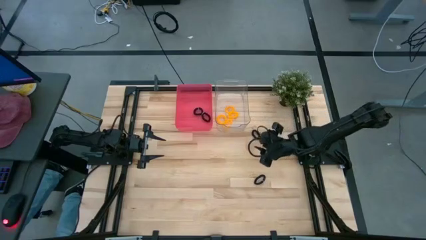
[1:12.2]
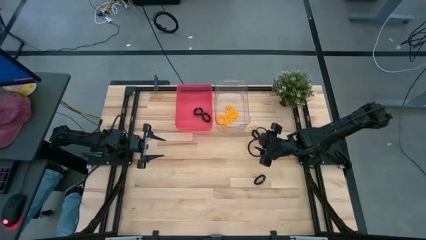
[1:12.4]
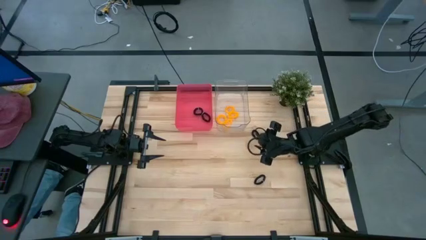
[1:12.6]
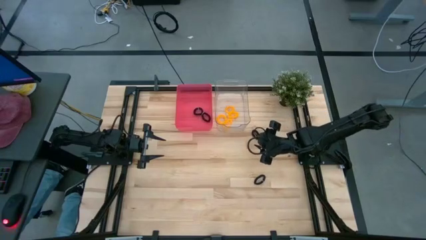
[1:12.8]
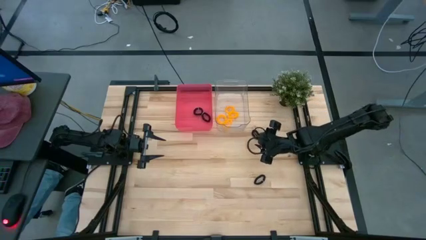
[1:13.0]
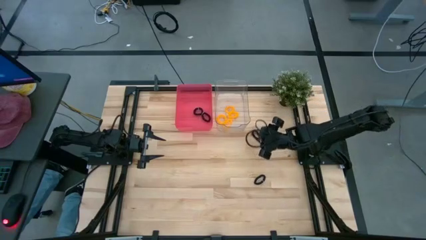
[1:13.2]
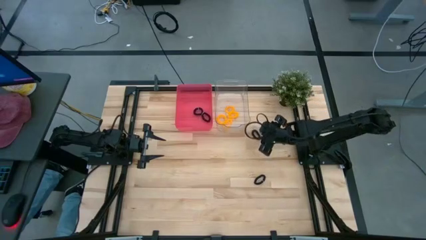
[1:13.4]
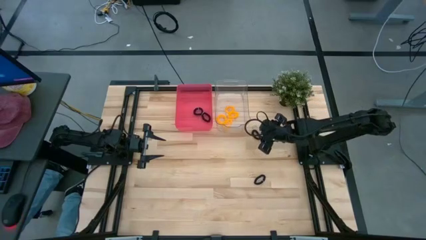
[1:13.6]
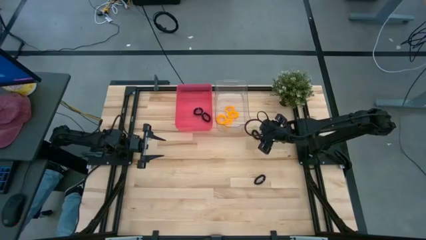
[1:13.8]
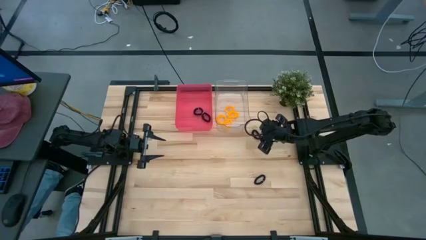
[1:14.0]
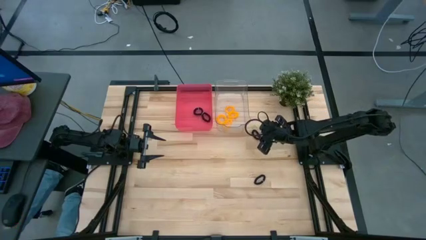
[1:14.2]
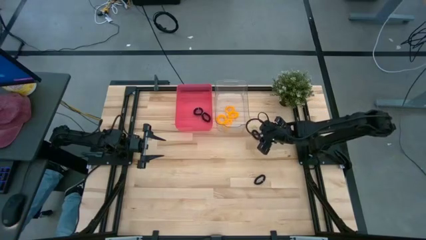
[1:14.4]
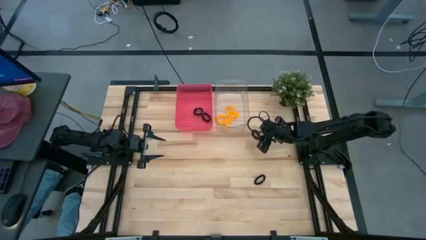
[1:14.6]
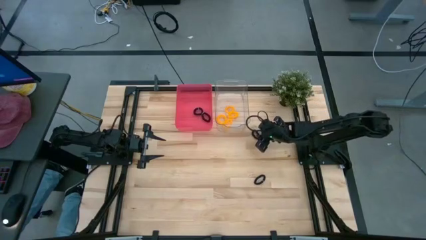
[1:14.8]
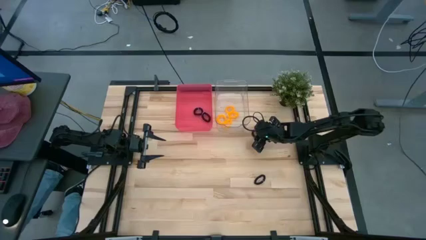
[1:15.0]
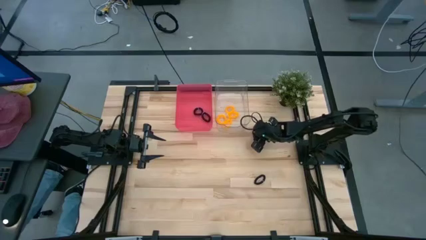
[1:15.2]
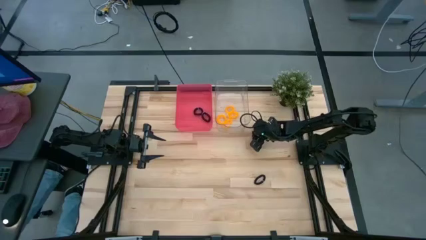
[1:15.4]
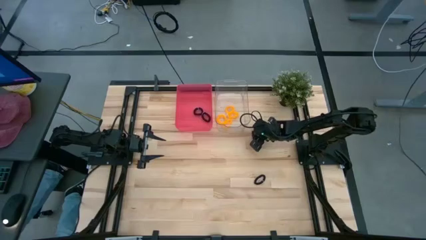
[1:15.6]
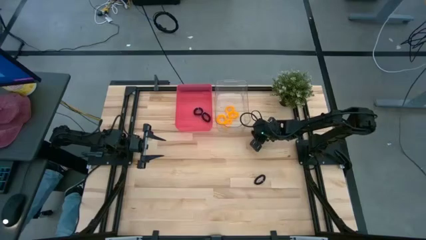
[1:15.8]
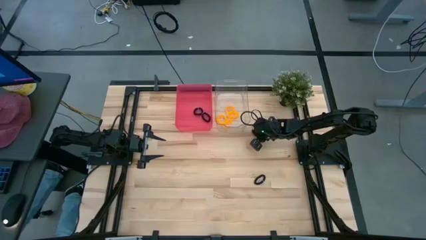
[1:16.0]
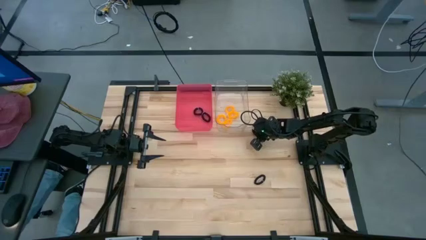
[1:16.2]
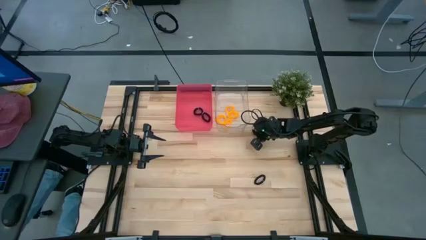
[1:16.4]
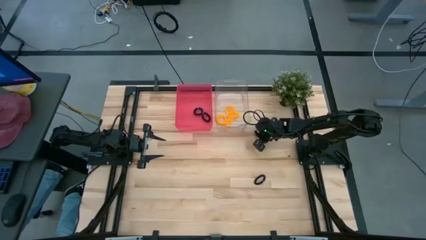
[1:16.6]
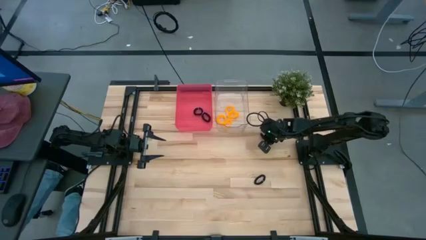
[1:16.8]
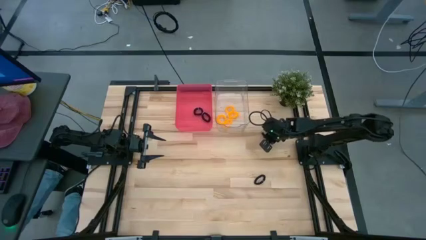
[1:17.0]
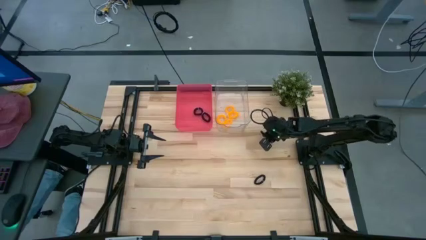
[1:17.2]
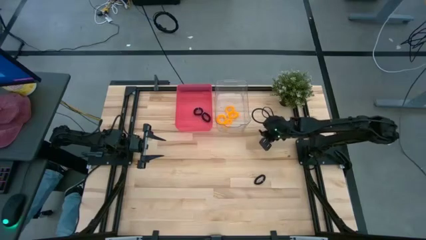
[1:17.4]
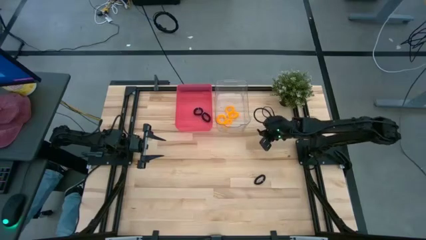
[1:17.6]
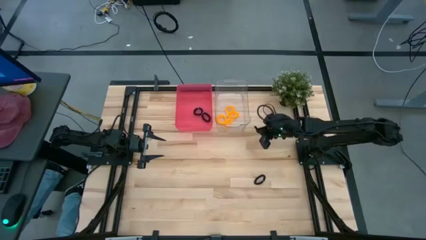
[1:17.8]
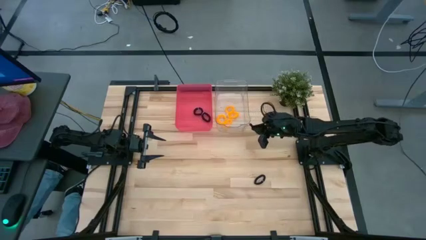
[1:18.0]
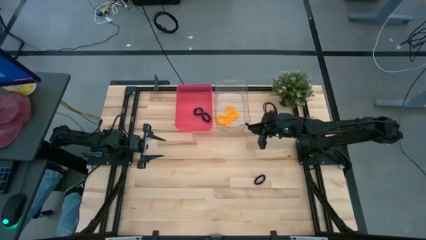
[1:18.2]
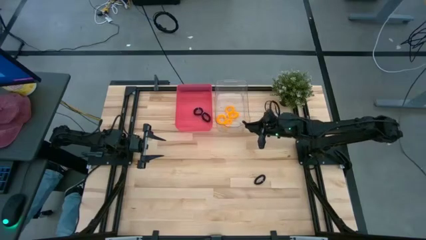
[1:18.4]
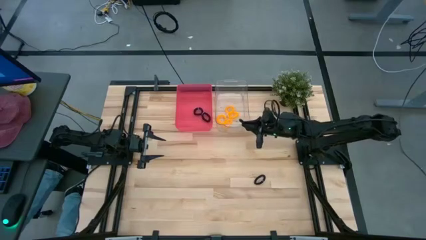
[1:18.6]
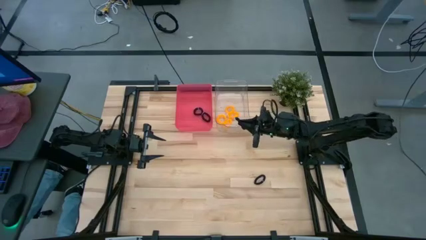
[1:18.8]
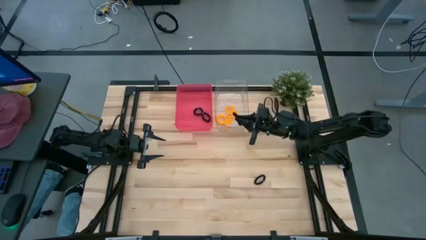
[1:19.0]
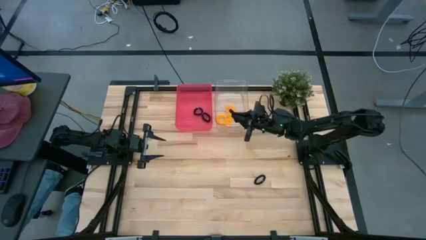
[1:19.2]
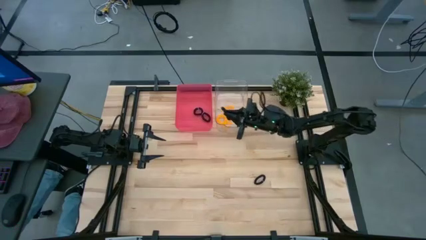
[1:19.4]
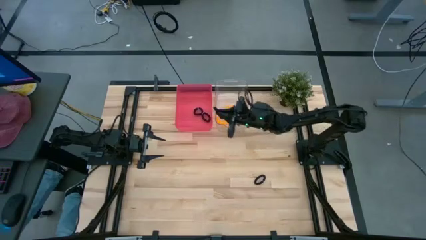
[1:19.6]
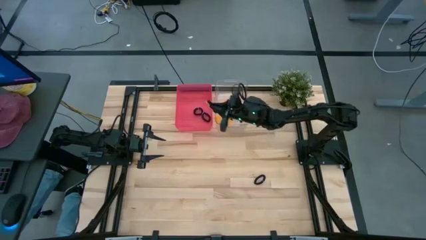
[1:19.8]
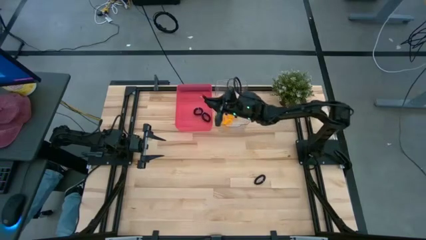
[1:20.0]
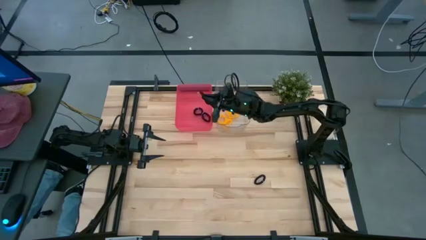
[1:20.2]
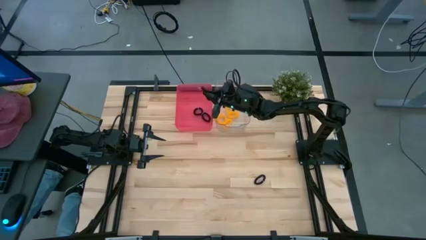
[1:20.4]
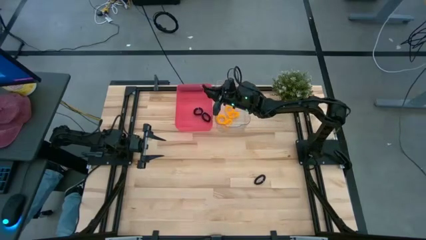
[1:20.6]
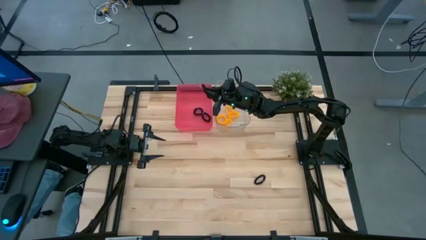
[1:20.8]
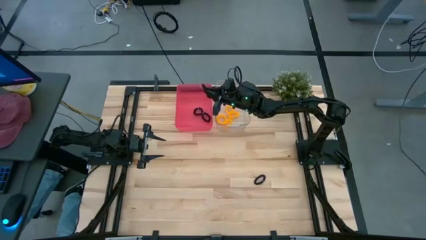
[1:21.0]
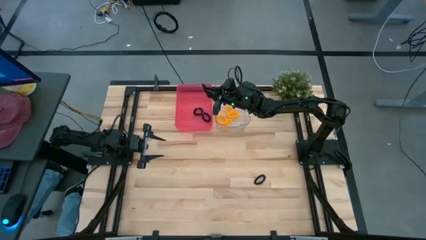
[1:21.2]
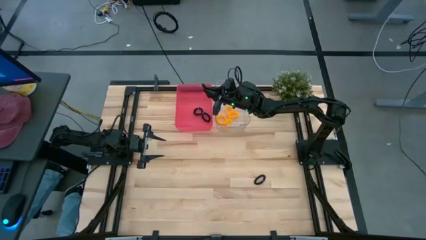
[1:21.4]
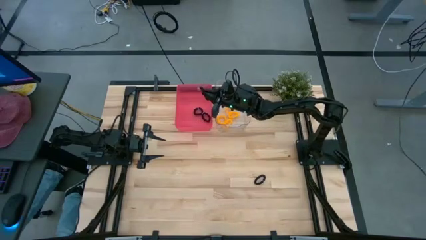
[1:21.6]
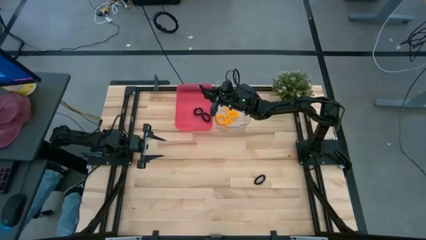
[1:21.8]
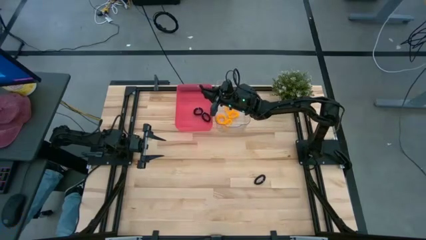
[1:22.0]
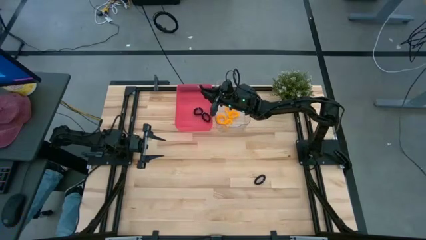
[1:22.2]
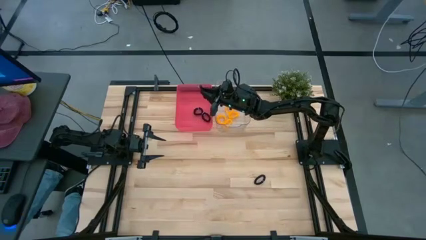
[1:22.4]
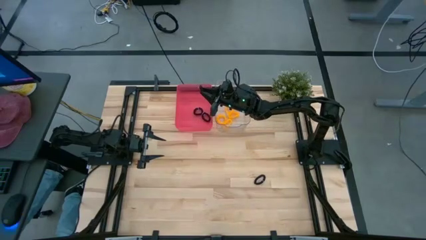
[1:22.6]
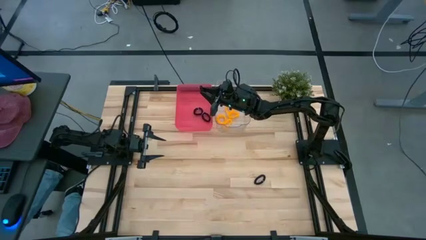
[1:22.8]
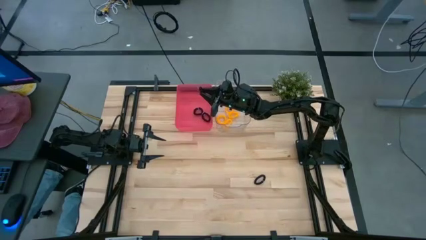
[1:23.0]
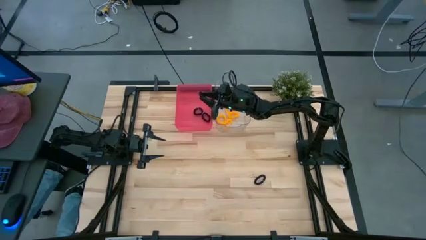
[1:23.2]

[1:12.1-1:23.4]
Task: Sort spring keychains
Put the black spring keychain into the red bin

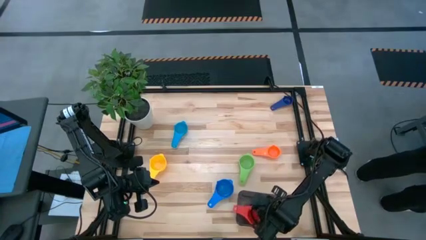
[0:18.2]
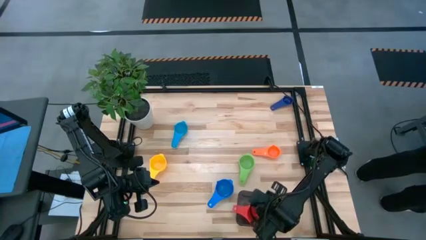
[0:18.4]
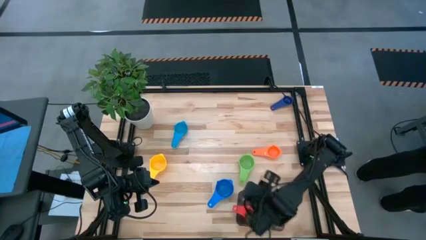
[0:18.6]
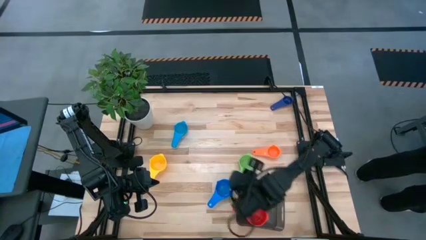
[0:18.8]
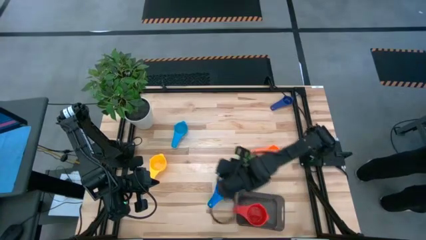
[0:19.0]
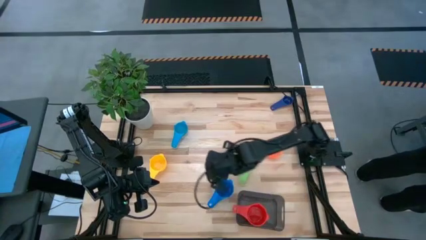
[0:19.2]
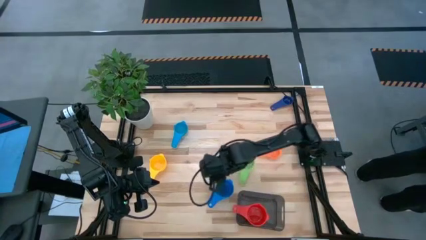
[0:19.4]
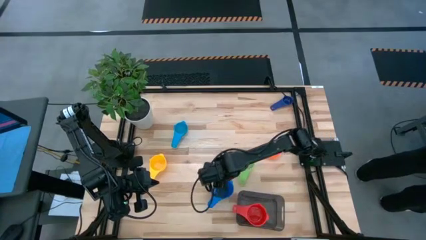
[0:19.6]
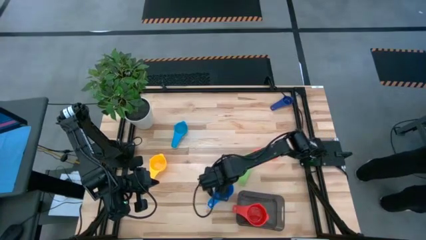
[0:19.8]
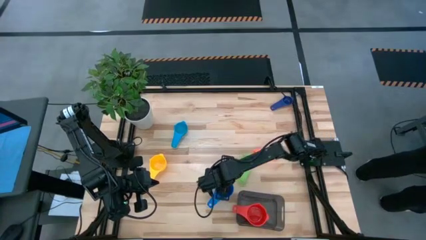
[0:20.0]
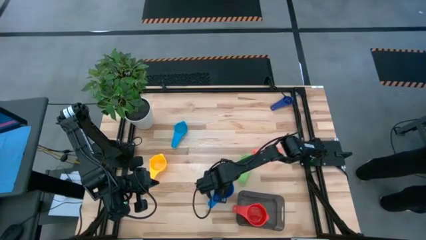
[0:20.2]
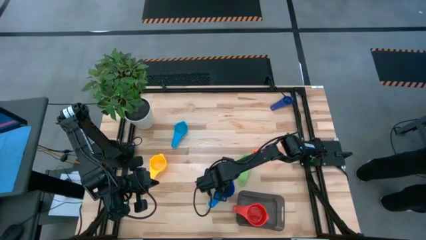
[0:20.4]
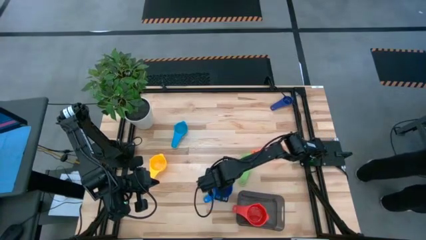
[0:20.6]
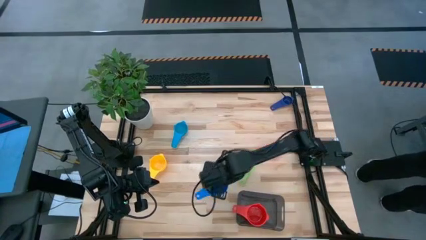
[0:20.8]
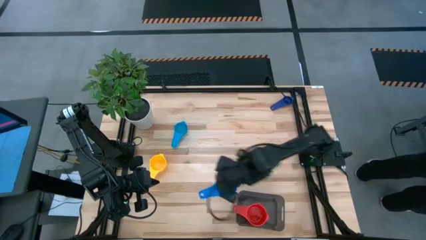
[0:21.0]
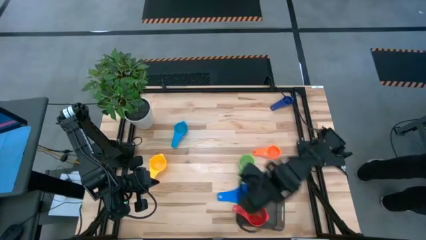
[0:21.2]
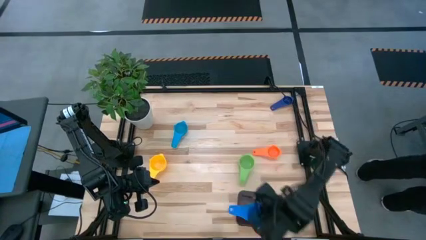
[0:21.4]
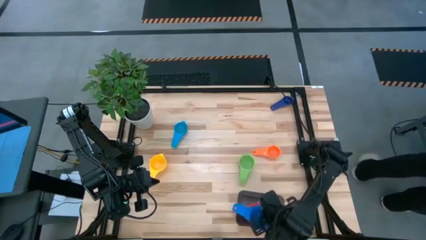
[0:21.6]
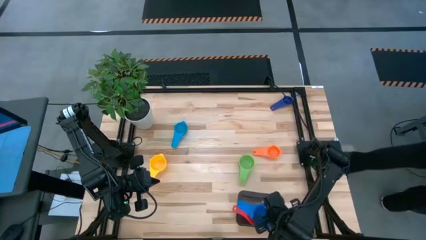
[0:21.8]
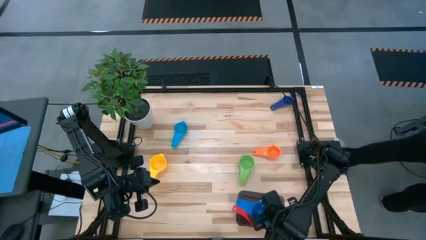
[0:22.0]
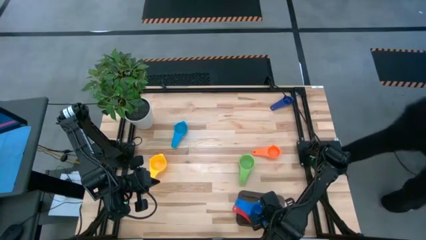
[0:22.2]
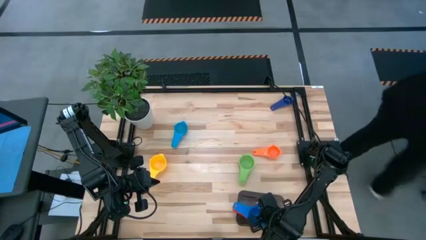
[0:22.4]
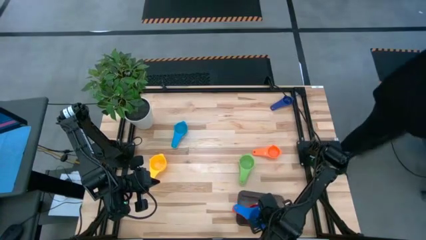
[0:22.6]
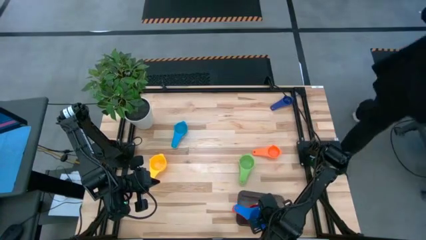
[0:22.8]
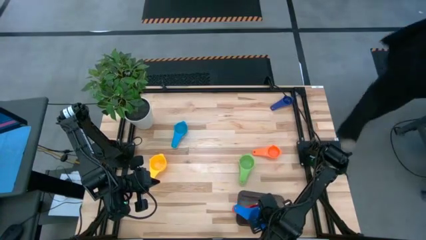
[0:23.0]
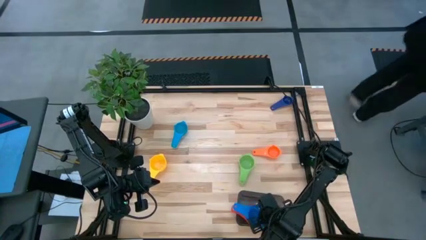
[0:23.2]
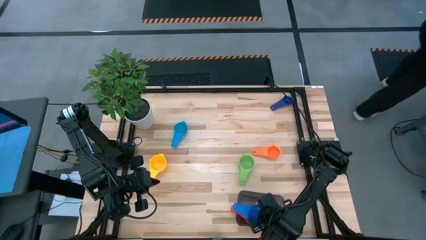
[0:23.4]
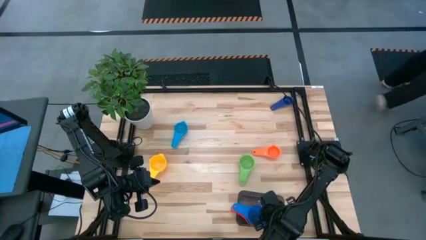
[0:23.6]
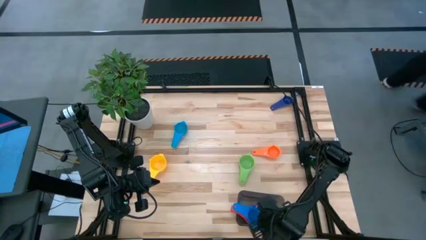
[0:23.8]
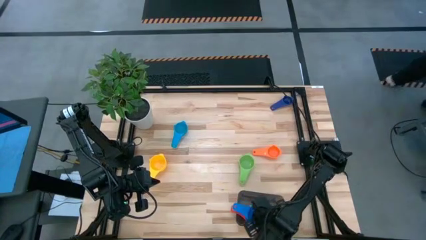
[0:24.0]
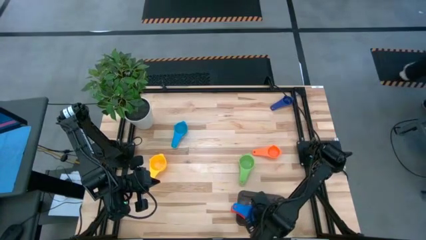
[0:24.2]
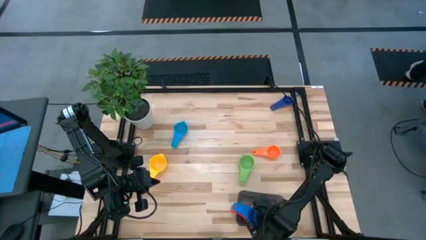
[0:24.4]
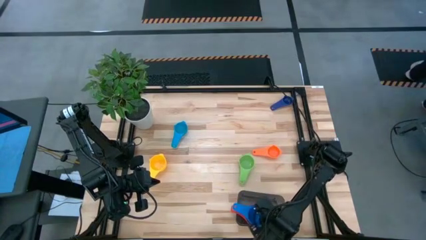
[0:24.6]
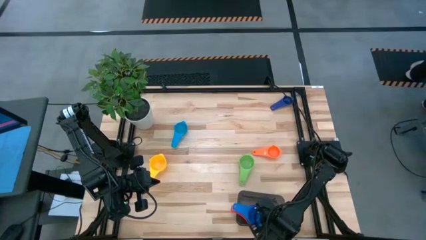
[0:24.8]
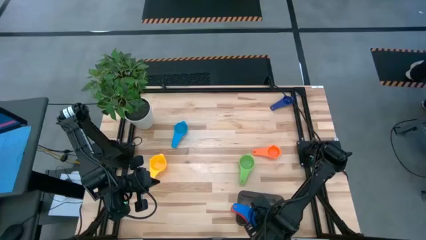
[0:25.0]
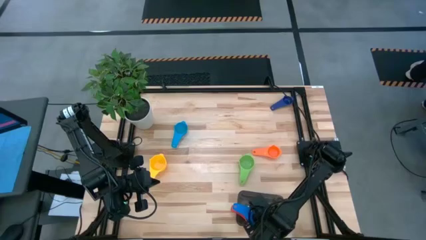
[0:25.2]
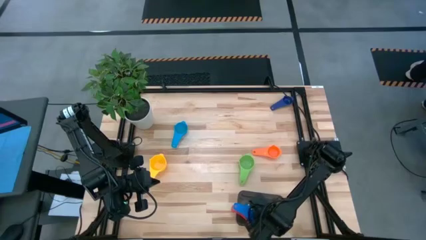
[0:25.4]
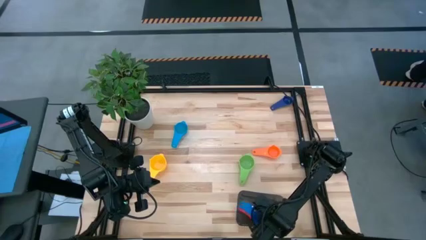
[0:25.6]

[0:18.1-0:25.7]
Task: Nest measuring cups in basket
Stack the blue measuring cup on top of the red measuring cup in the black bin
